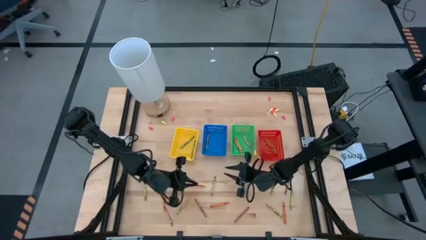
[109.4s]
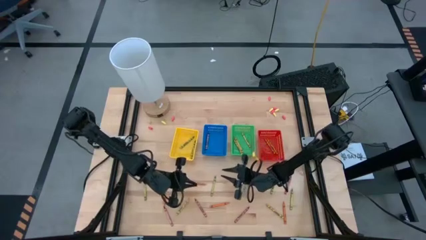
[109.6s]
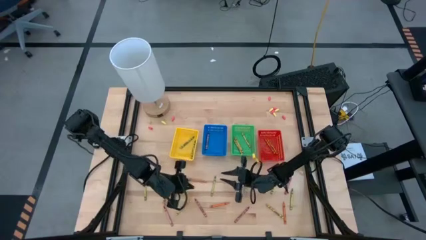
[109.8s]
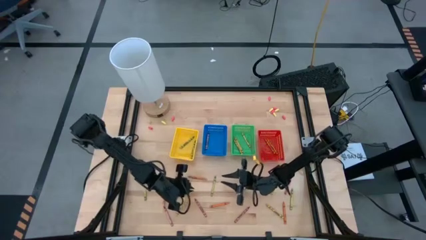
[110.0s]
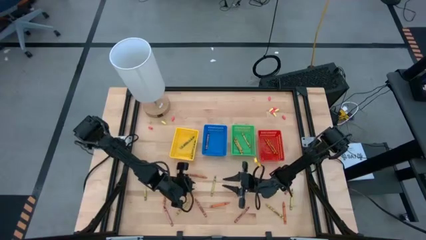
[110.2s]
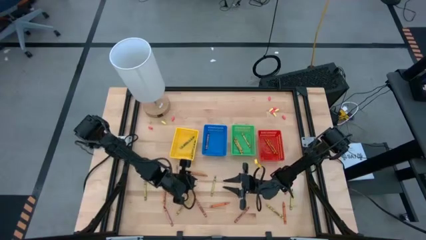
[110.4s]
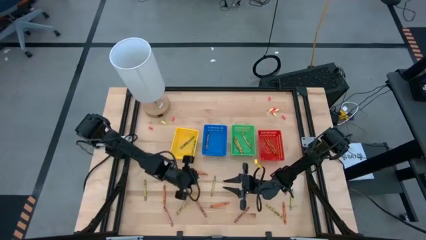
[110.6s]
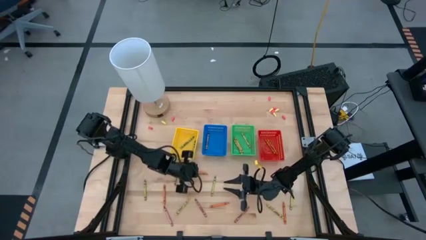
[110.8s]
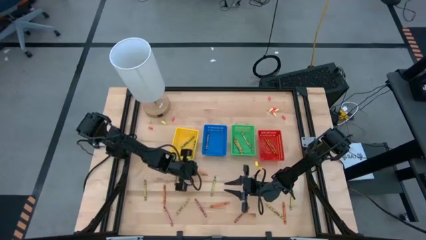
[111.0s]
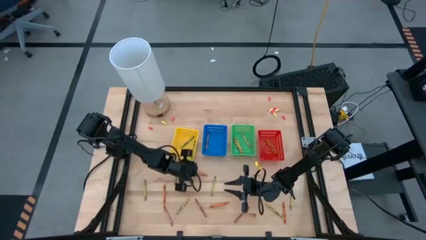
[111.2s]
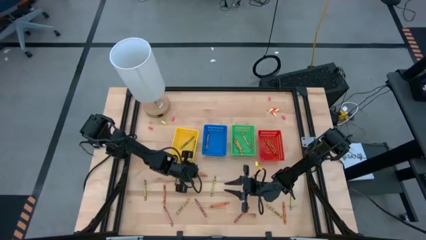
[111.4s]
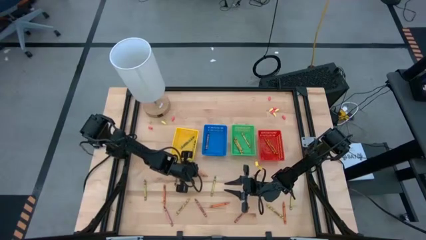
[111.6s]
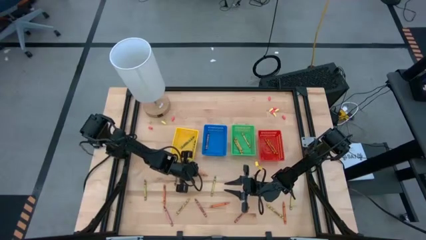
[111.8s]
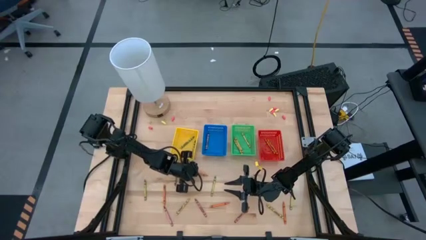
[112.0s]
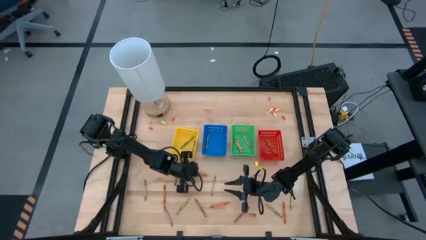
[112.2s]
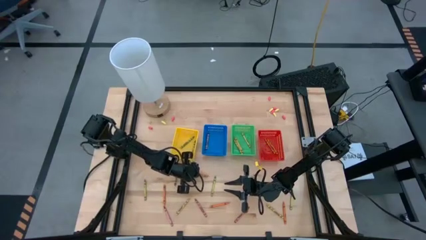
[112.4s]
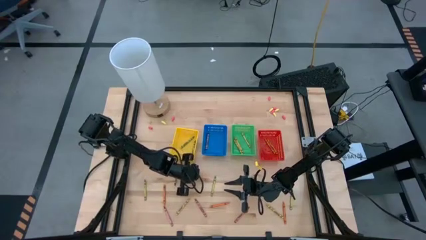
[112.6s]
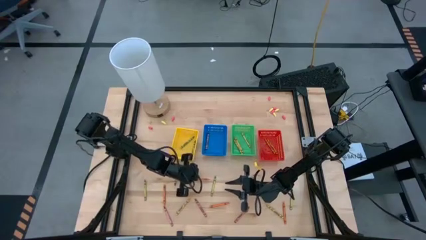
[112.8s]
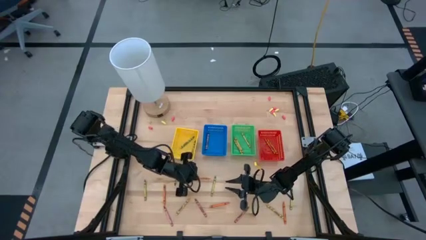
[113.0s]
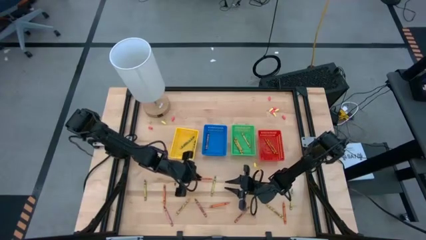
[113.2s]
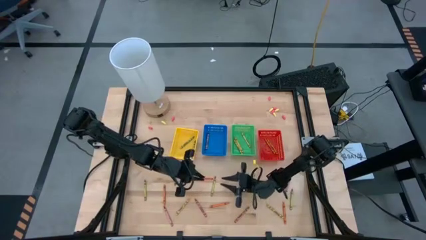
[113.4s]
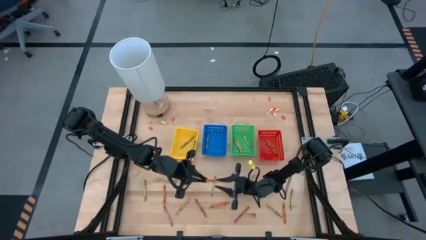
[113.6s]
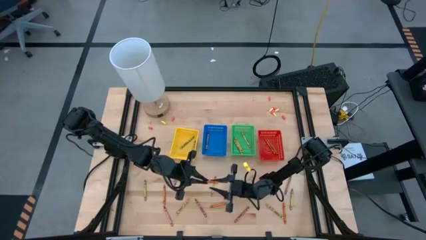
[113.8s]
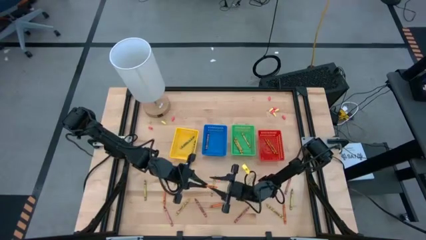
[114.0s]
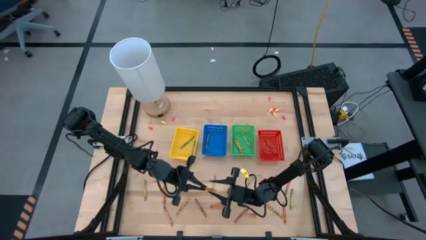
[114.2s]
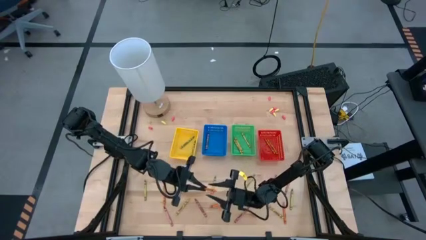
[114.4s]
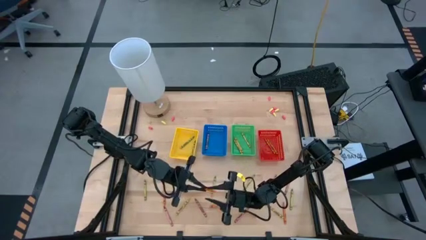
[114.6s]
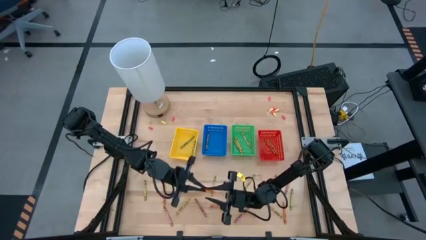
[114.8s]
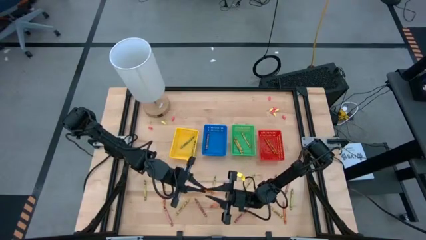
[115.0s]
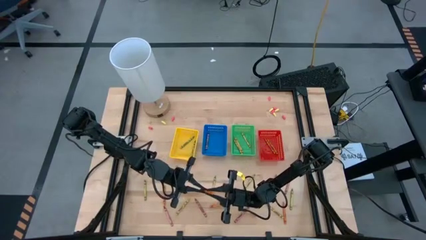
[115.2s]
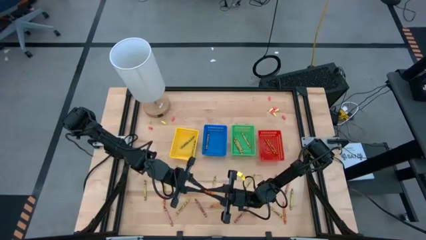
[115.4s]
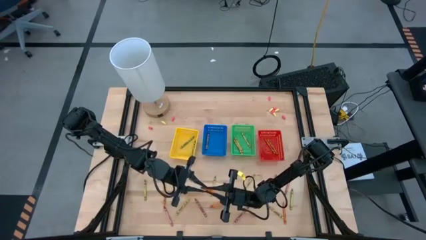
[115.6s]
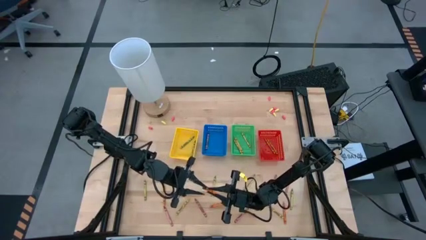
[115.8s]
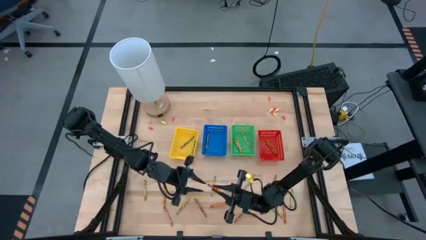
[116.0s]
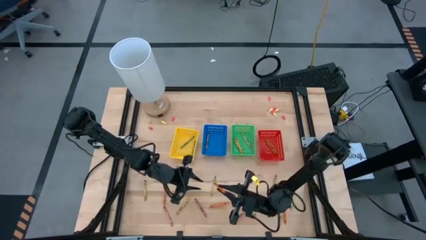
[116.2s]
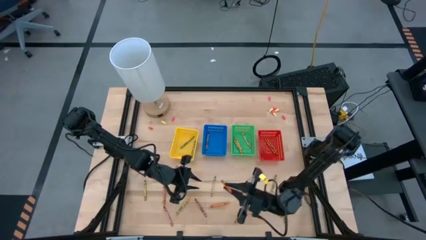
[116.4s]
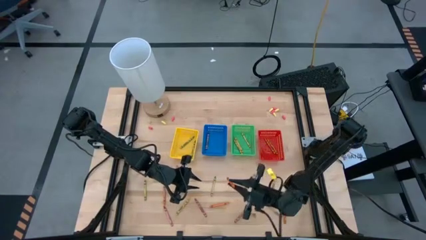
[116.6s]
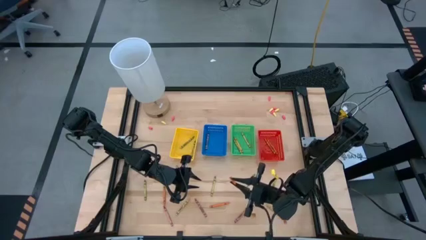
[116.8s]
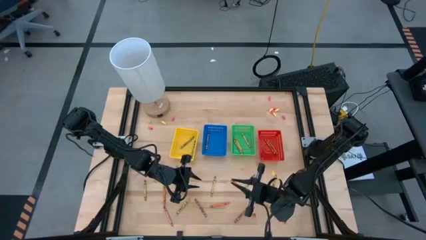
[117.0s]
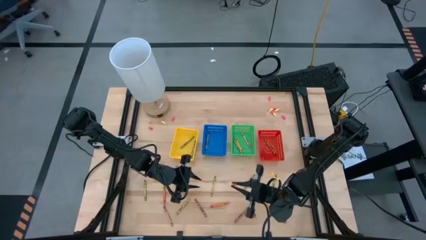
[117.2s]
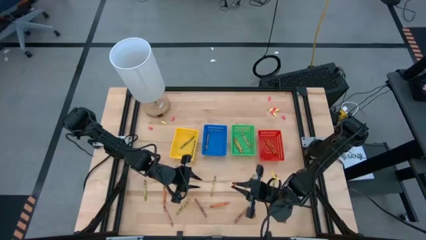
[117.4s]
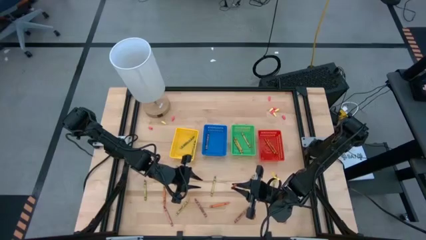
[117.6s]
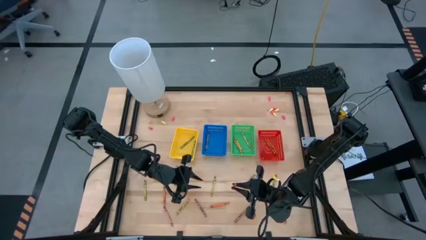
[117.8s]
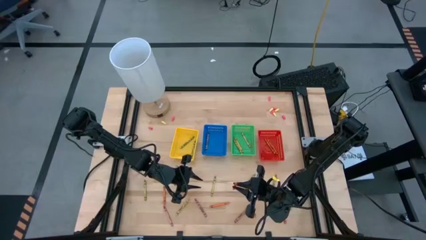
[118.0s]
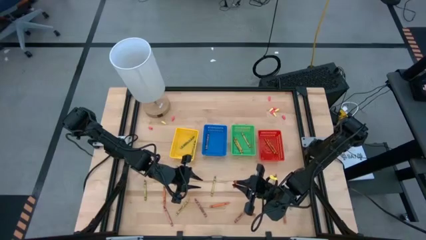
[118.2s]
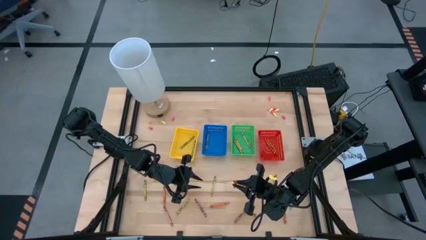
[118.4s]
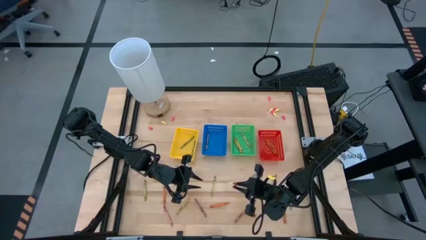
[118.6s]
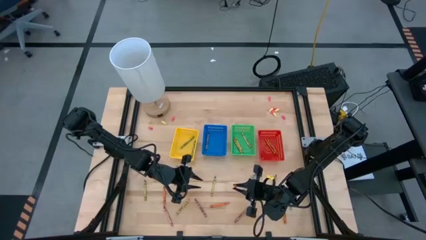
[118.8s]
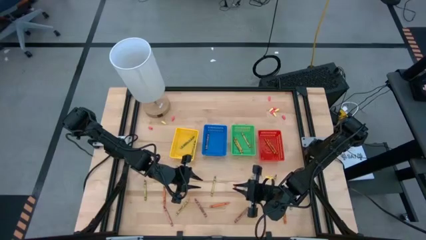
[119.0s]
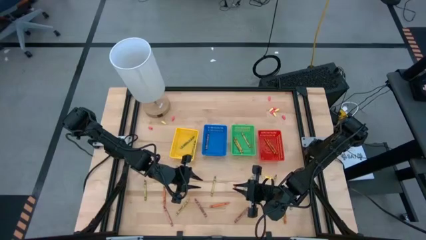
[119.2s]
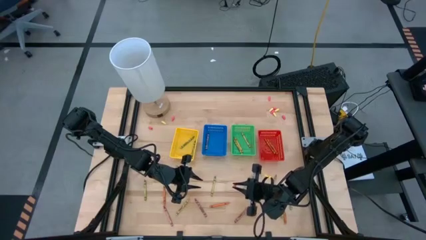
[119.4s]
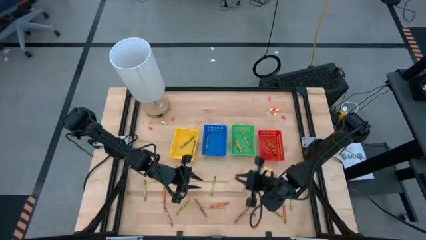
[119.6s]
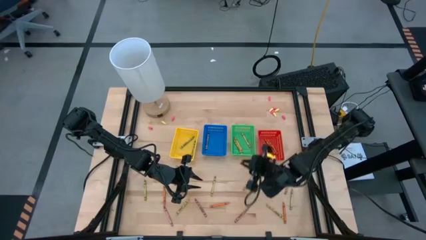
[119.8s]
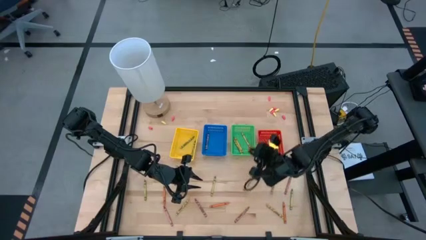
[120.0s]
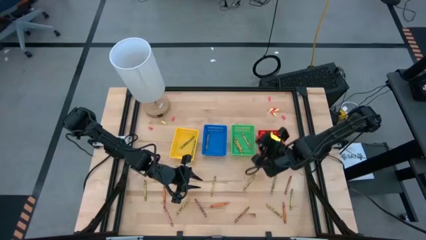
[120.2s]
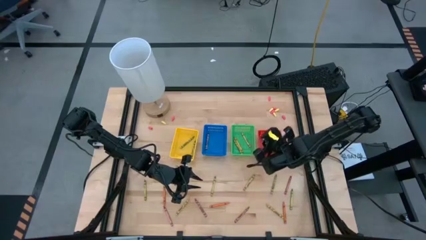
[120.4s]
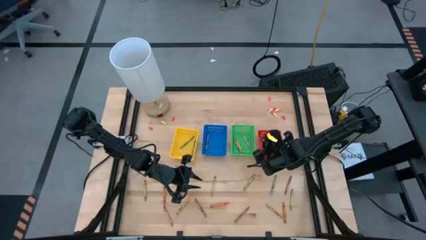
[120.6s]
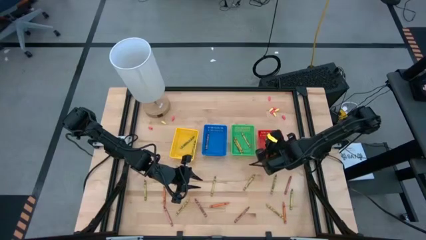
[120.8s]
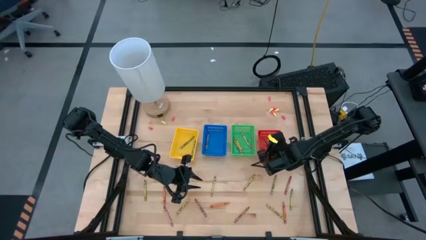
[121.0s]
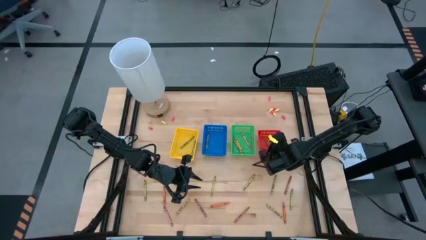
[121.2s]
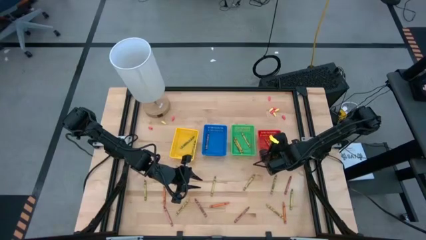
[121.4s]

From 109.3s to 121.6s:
Task: Sort crayons
Put the orange crayon into the red bin

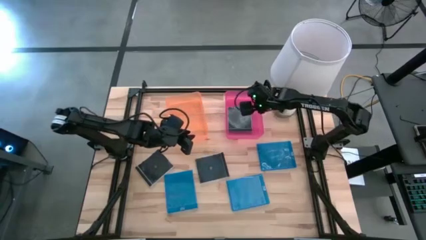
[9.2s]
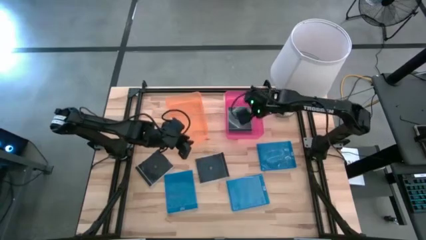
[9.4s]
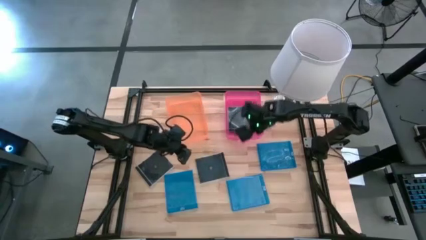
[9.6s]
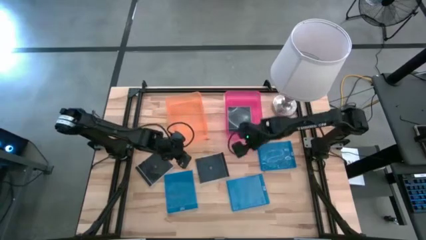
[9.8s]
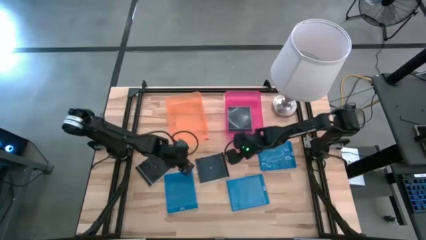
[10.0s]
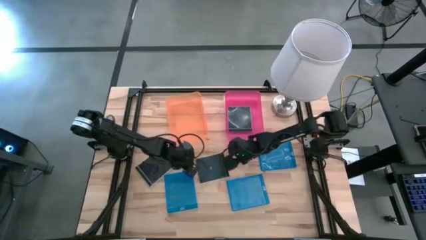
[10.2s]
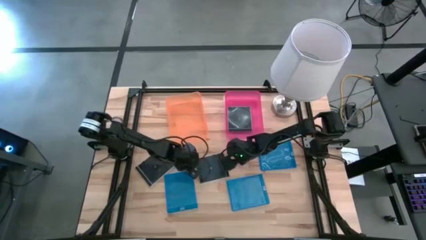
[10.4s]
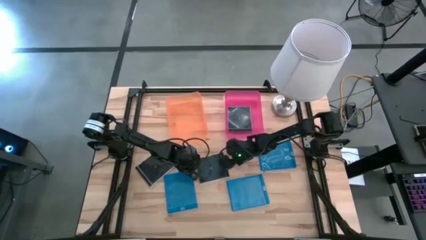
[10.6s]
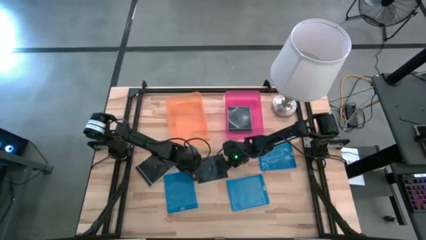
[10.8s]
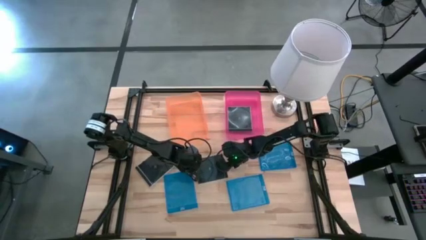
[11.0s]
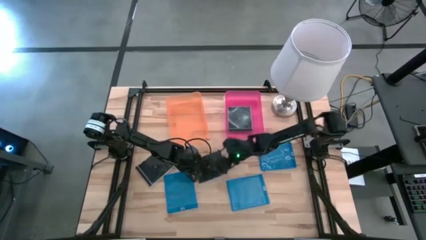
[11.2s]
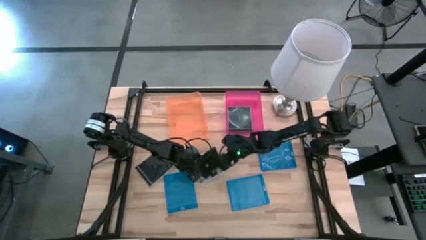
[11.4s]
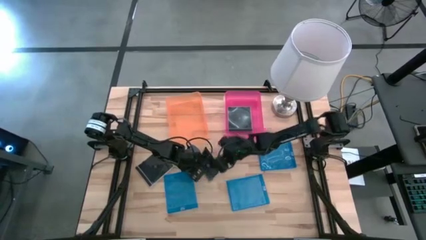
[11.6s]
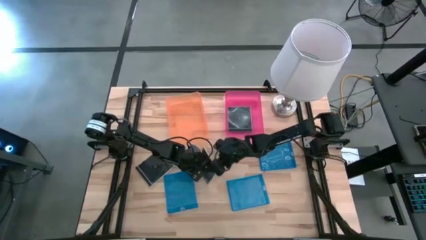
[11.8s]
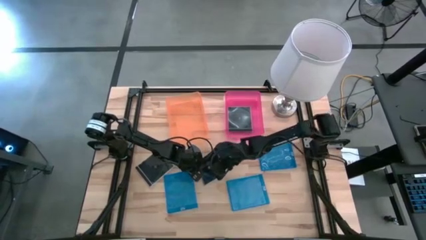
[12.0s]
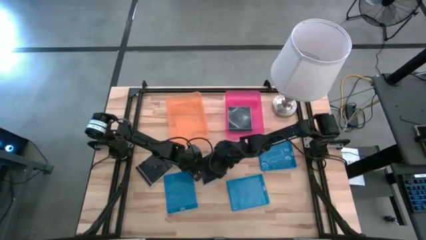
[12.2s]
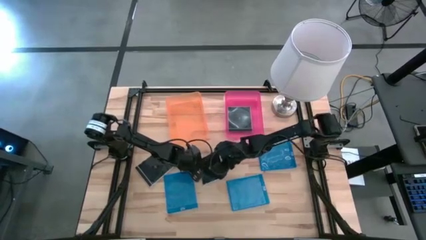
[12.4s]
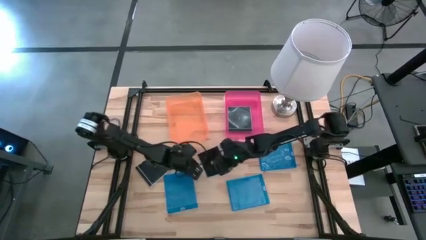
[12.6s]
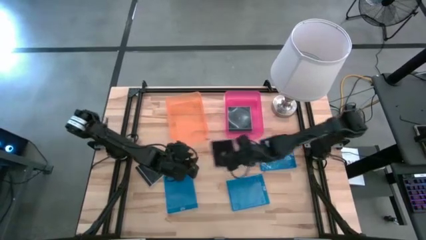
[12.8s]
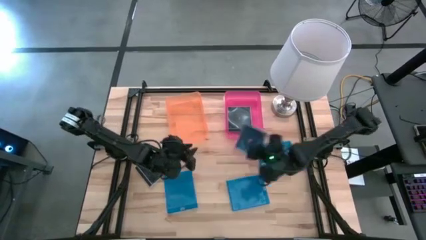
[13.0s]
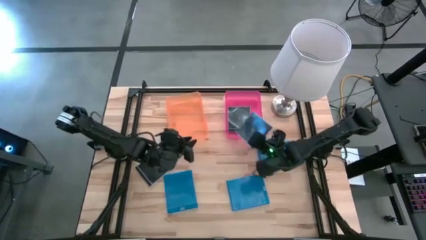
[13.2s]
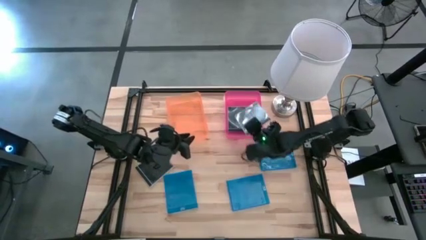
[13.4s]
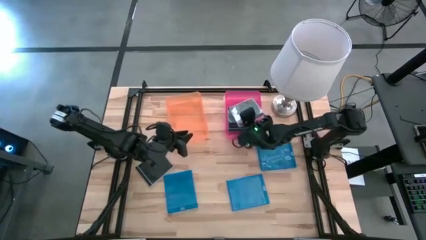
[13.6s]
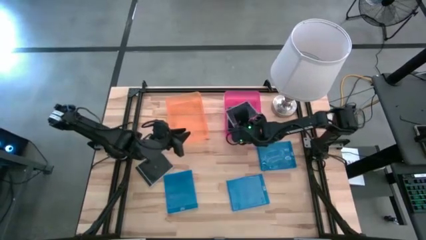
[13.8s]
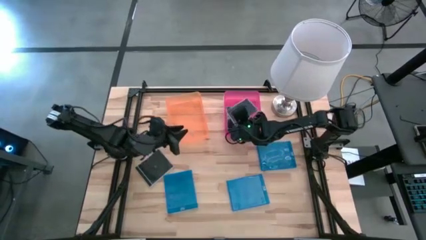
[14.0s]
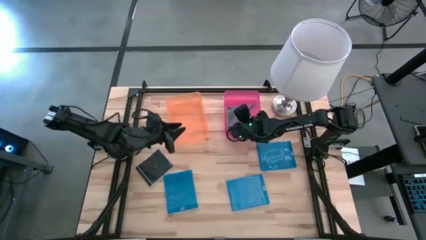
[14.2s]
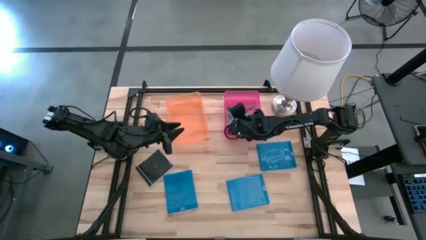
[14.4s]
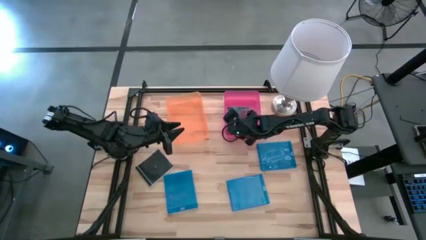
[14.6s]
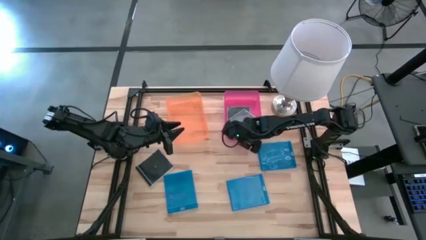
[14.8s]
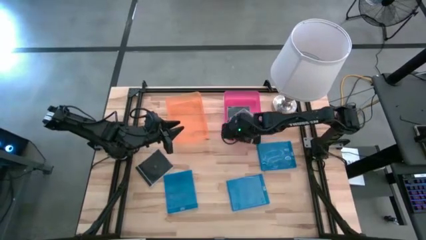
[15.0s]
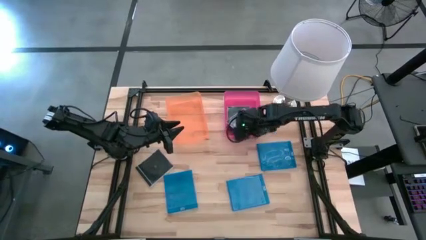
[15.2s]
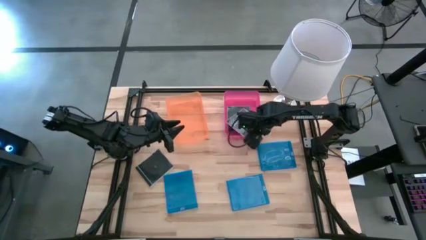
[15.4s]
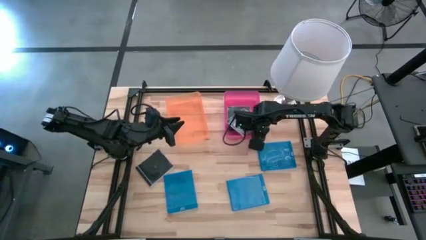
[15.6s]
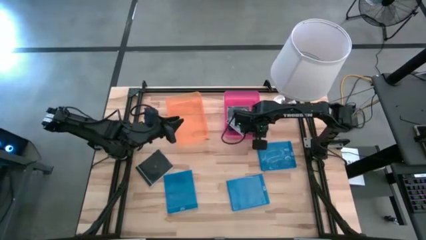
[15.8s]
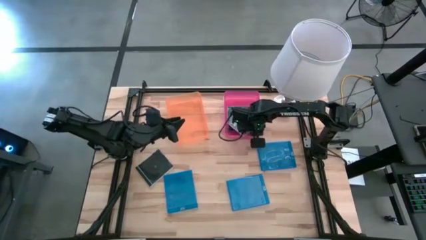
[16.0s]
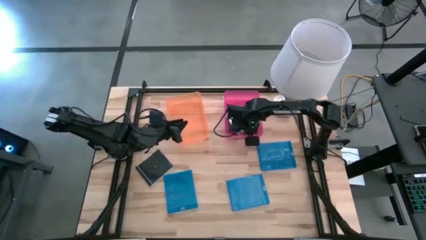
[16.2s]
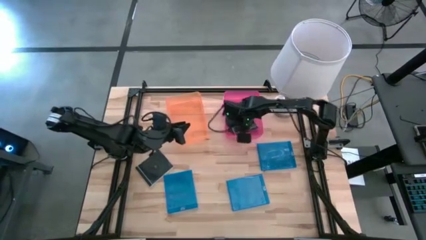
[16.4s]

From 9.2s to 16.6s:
Task: Pick & place jewel cases by type
Put the right black CD case into the pink bin
